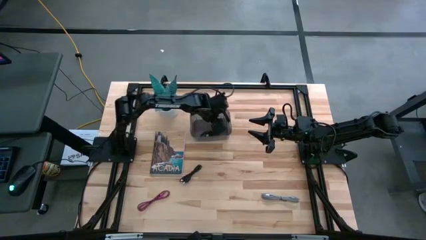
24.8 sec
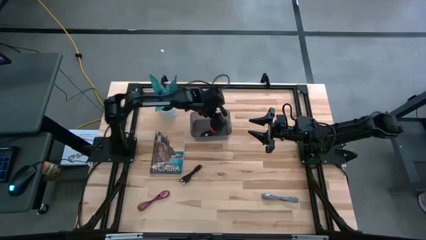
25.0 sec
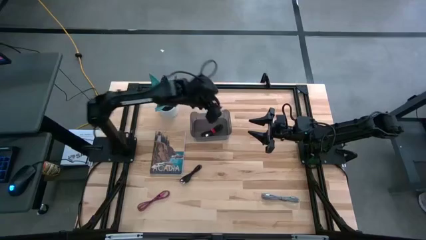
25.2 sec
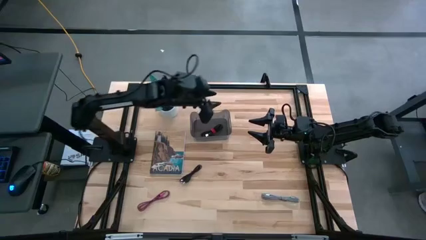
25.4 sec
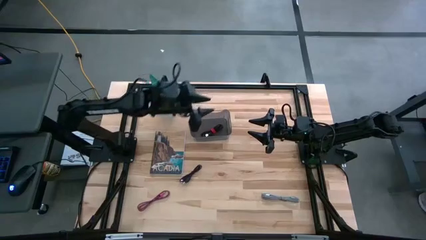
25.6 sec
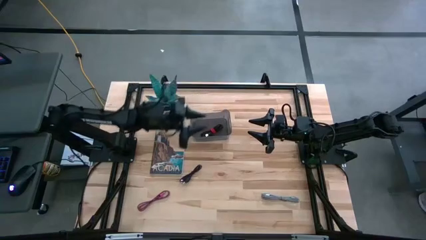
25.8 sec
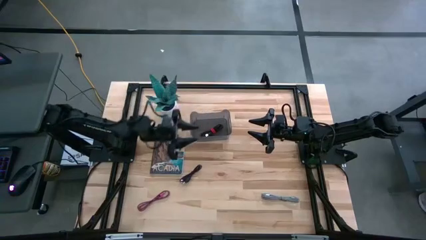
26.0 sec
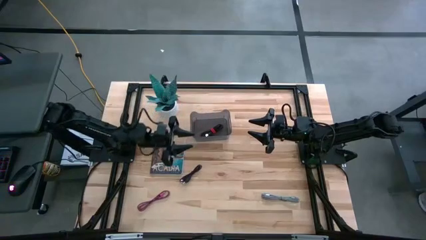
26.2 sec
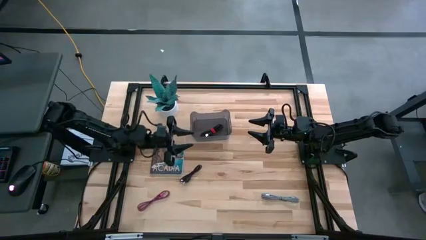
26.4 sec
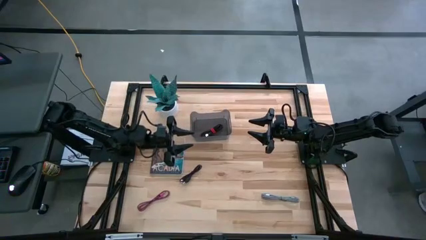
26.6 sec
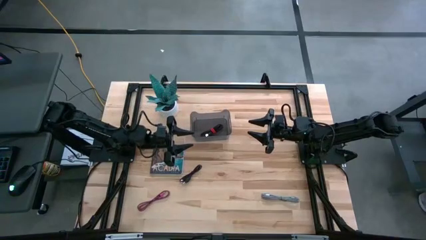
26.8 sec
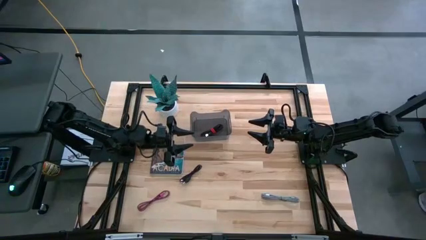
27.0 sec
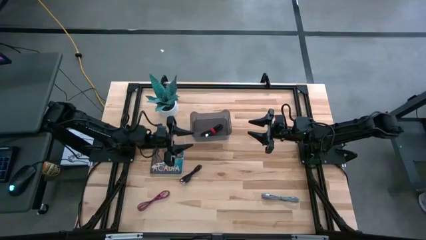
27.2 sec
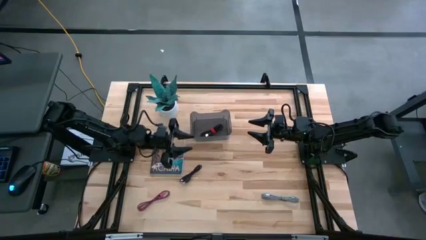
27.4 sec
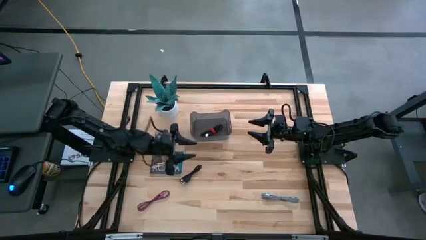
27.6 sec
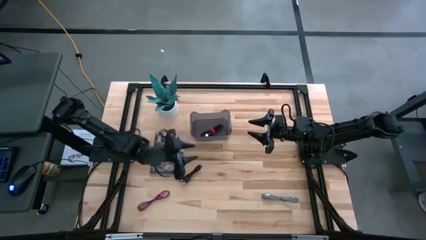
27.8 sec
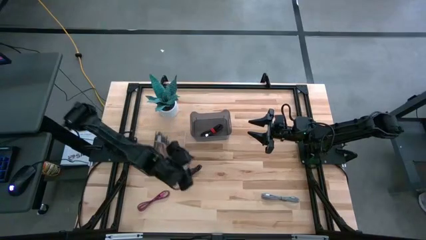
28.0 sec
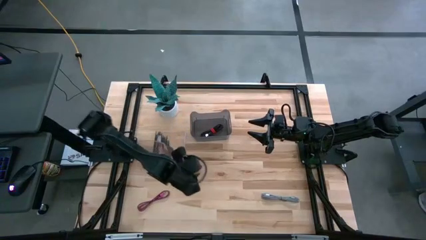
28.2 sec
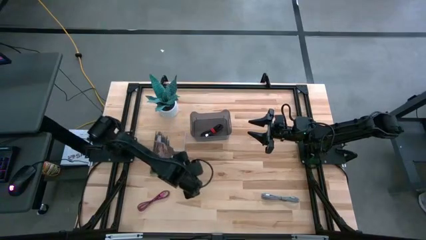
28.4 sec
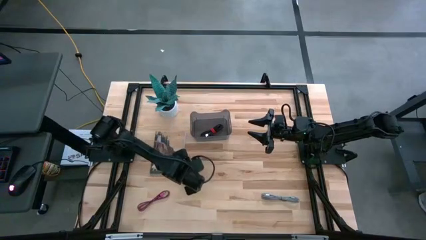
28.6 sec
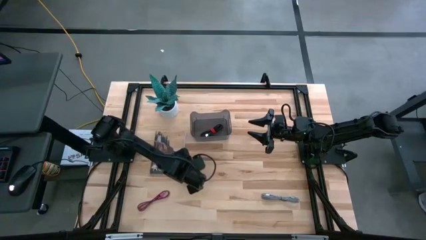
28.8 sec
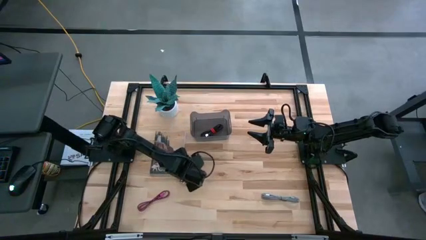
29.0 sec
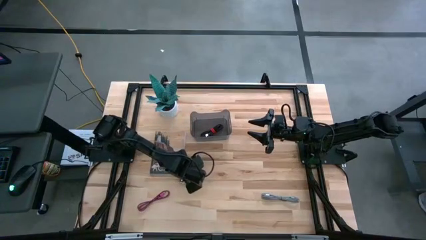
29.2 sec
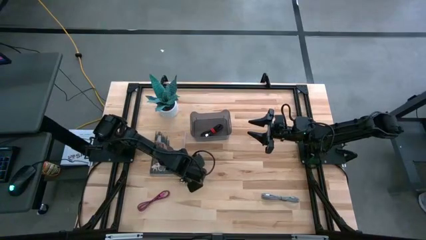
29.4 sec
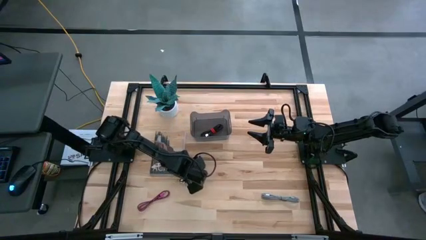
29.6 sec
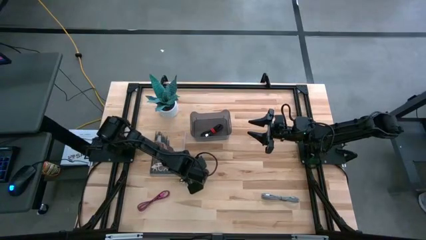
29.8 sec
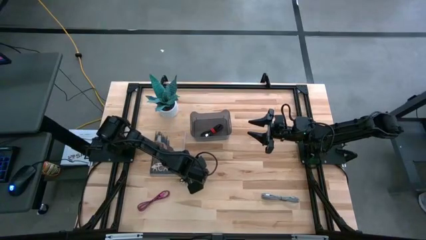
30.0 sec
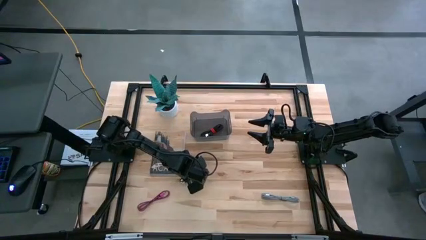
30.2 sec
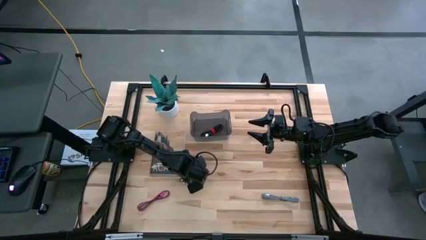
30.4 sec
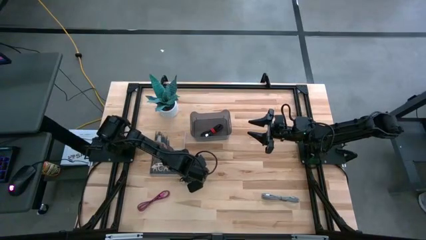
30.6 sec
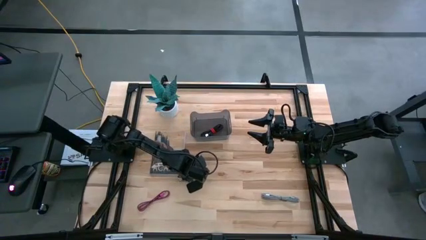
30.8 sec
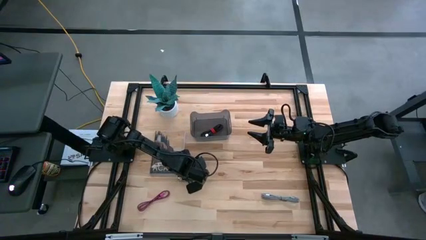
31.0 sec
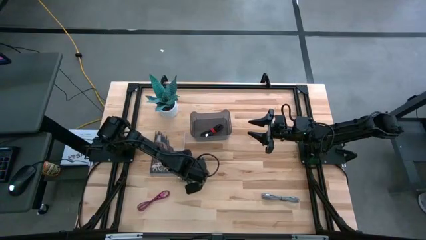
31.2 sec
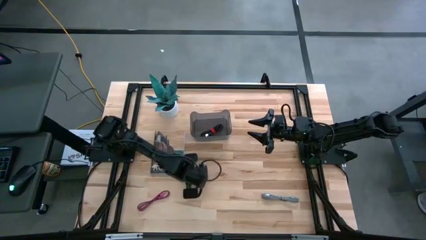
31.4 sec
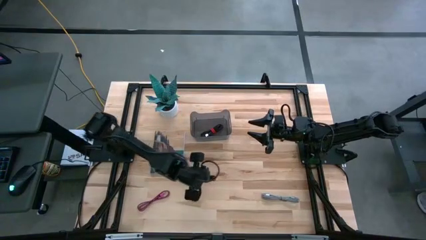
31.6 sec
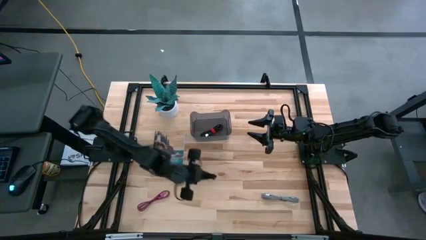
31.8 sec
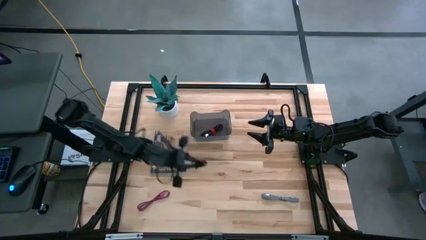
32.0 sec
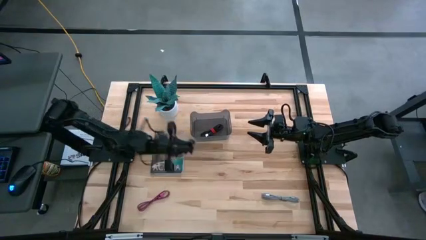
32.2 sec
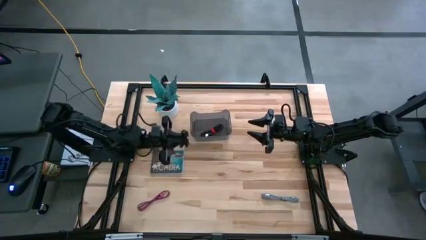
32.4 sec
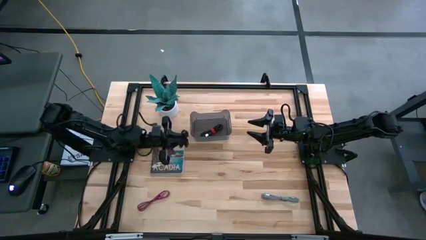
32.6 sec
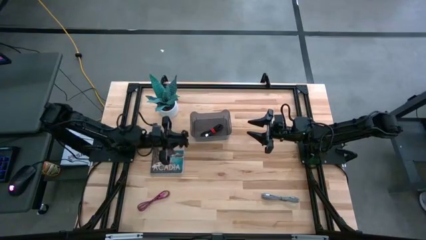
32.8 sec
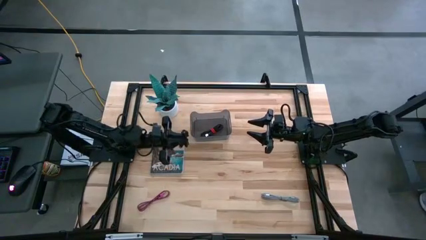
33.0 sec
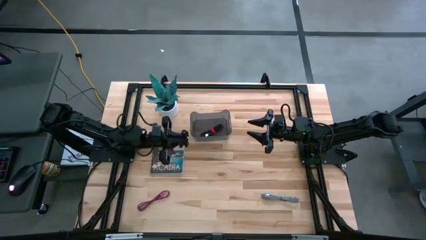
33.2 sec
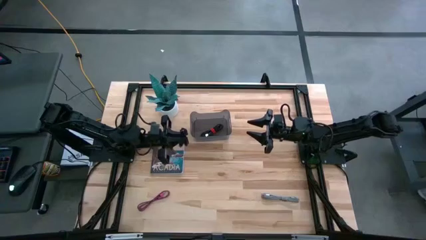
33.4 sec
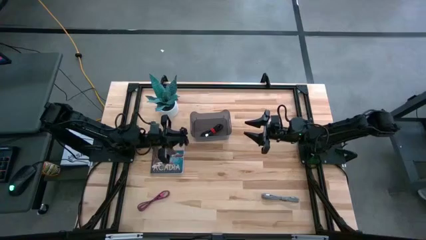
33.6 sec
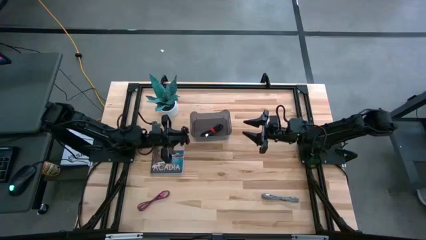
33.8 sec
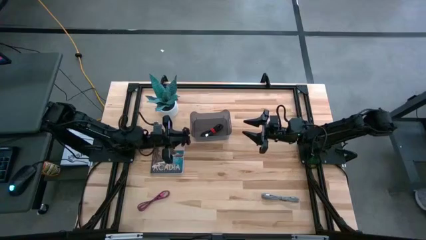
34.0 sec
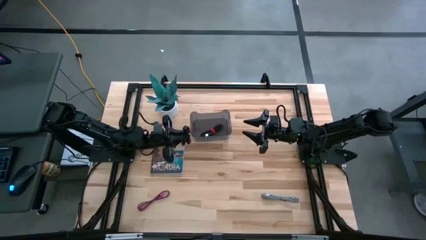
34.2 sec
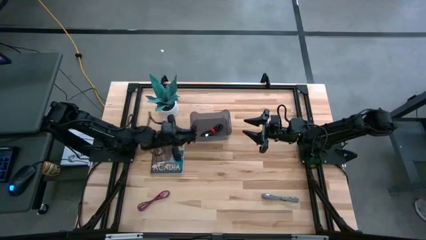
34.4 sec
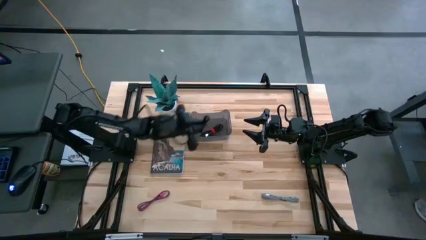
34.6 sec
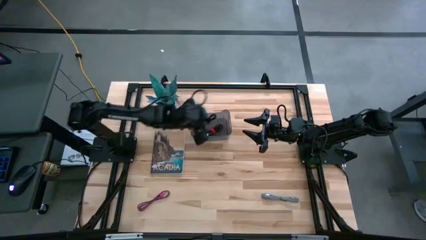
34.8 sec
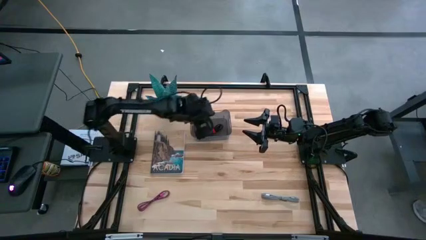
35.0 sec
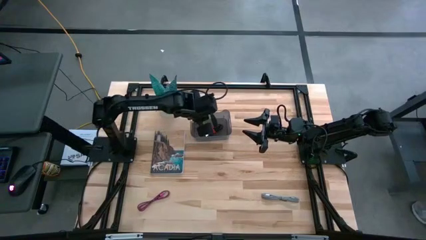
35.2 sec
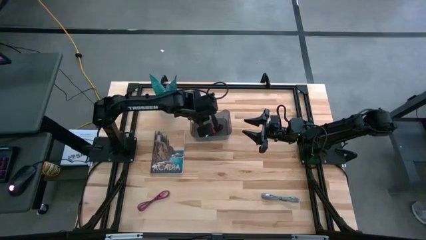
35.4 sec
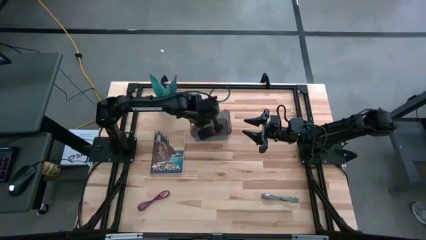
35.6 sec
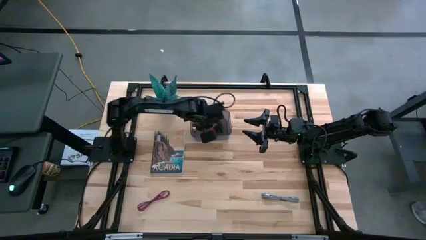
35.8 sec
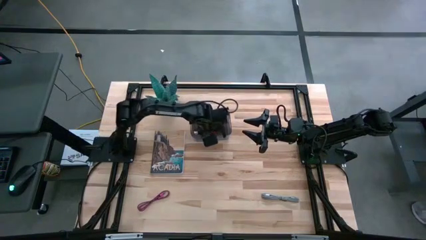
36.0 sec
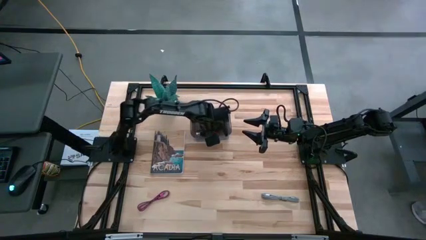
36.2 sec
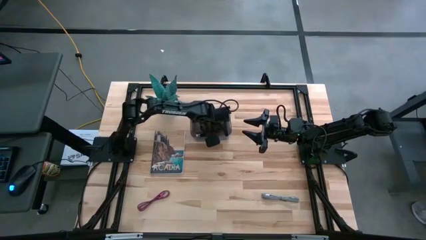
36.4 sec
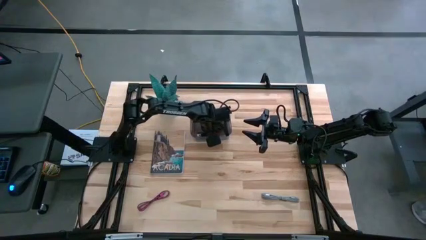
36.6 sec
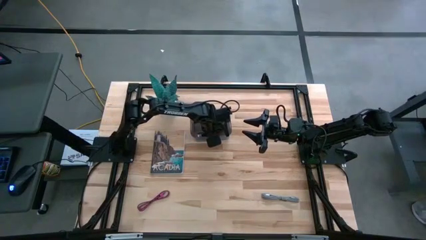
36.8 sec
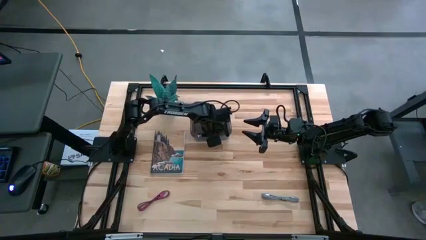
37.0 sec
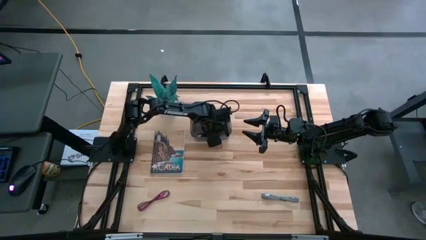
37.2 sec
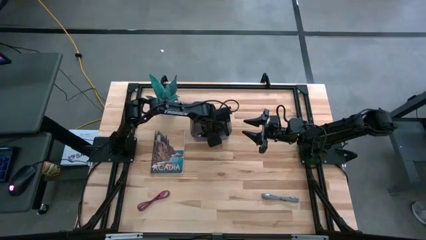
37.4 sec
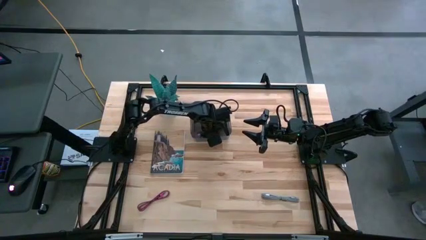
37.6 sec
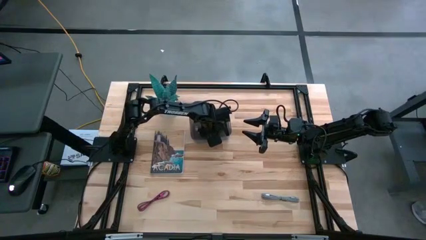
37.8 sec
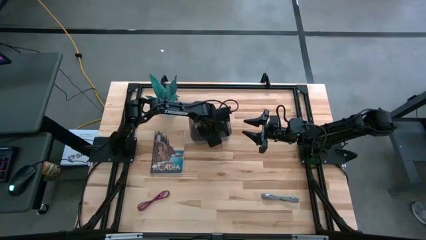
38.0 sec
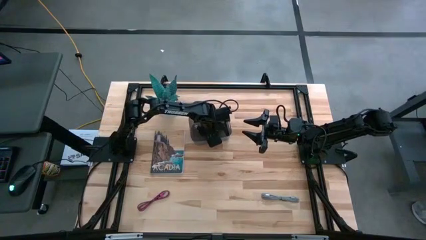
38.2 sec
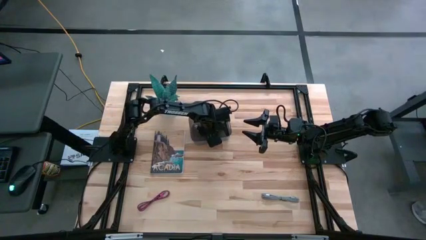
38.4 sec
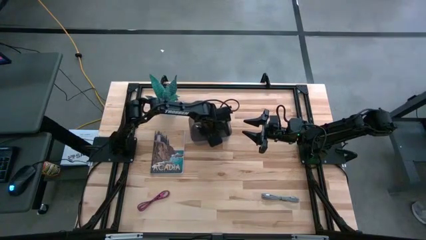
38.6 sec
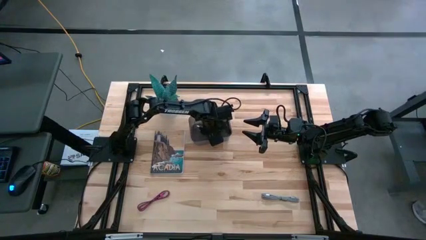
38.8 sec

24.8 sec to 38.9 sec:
Task: Pick and place USB-C Cables
Put the black USB cable into the black bin
